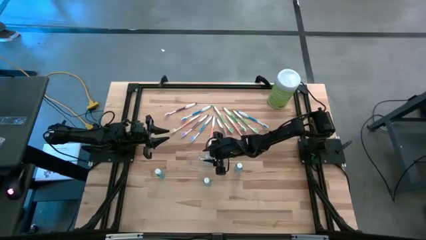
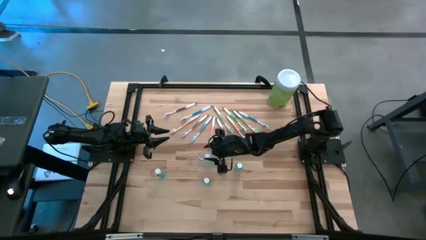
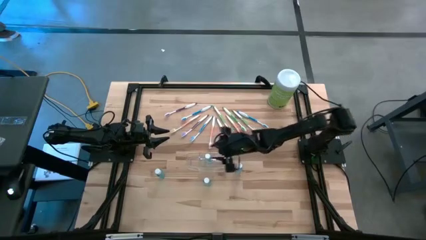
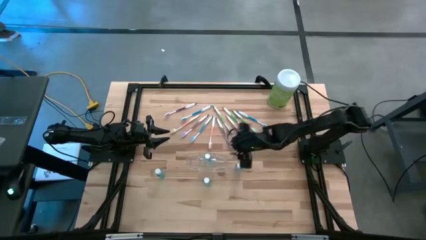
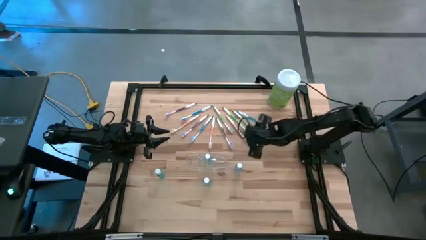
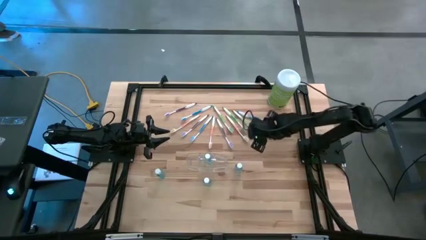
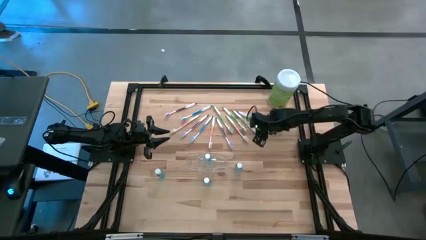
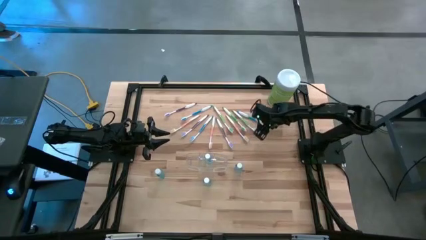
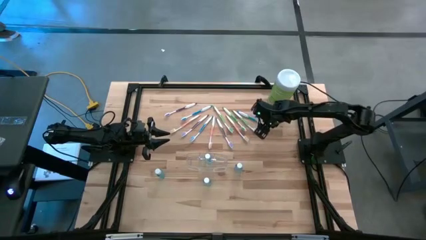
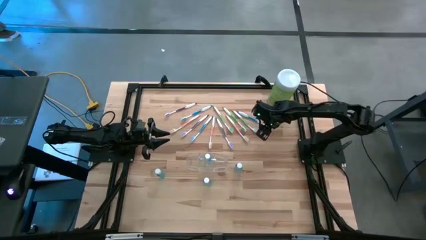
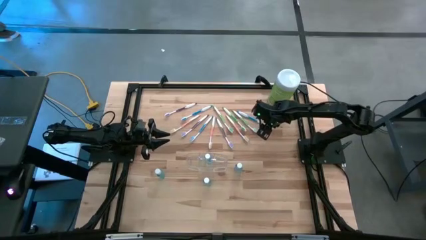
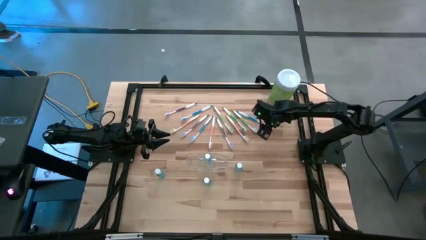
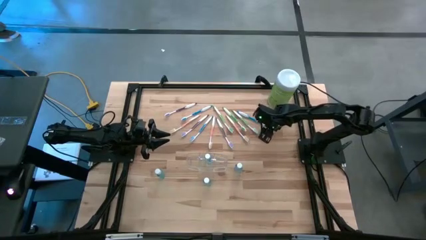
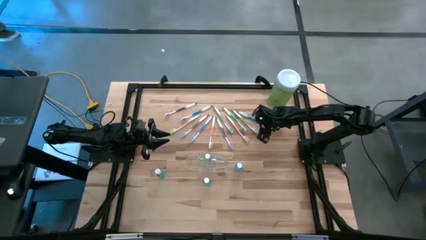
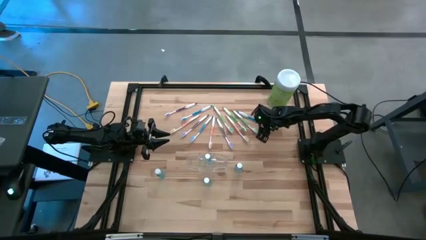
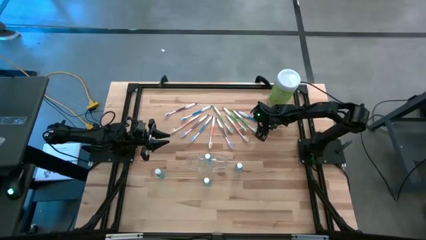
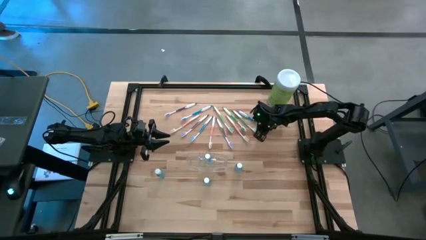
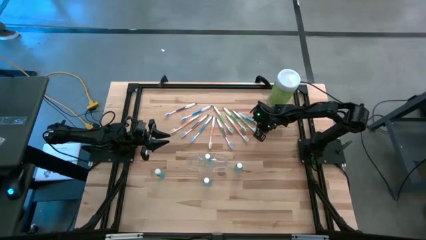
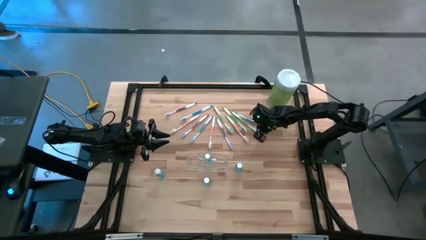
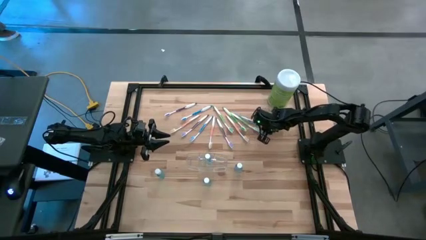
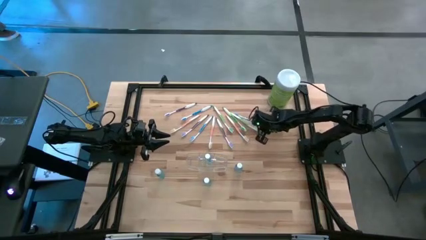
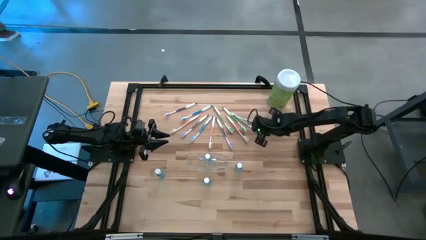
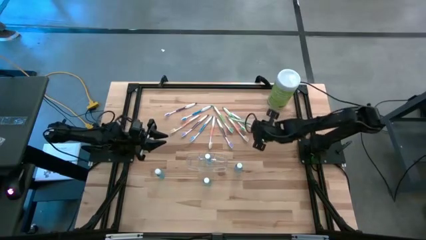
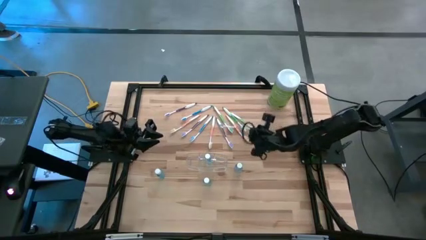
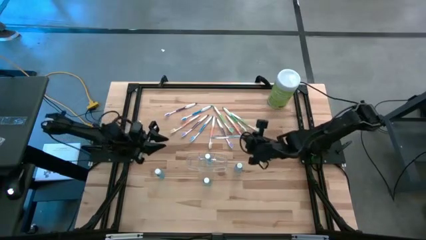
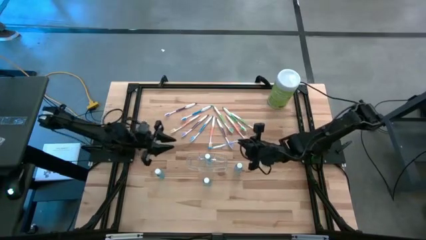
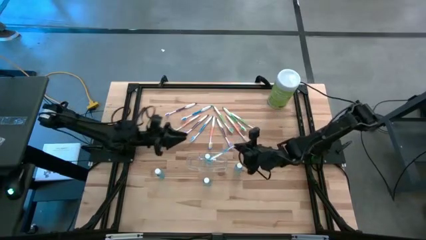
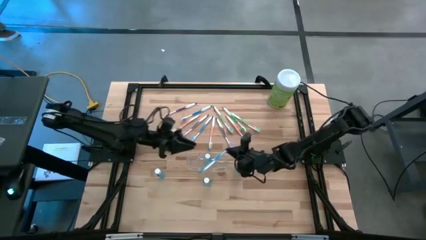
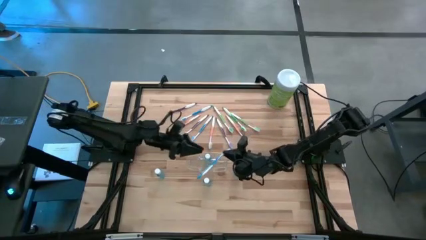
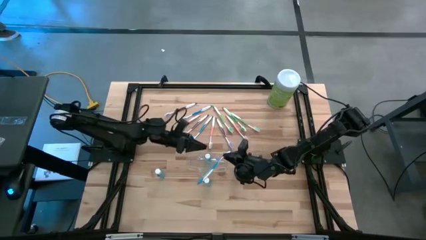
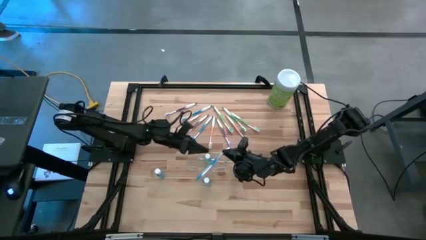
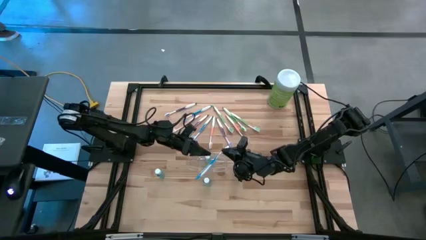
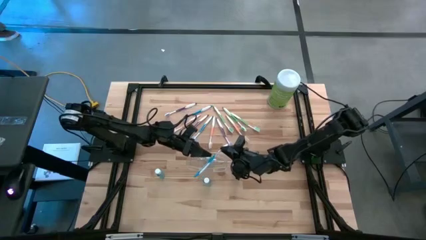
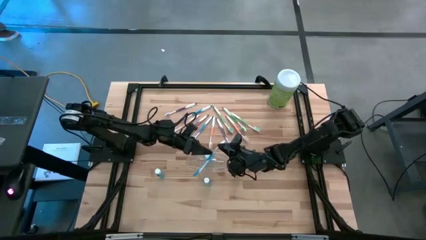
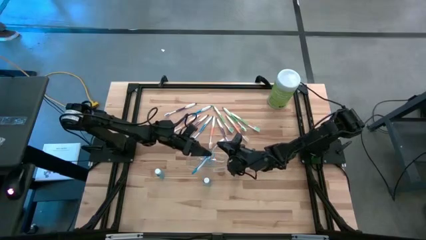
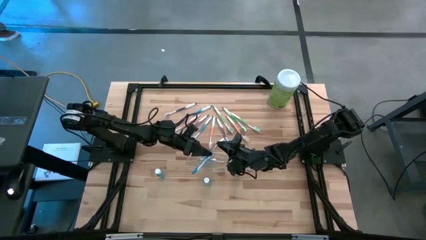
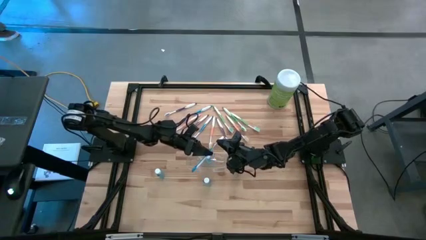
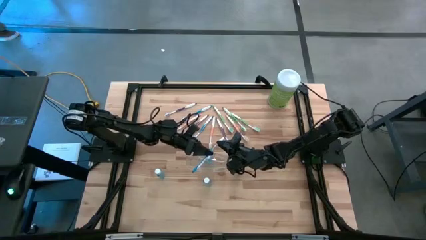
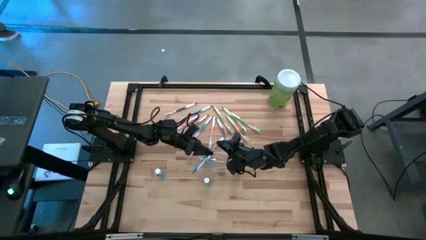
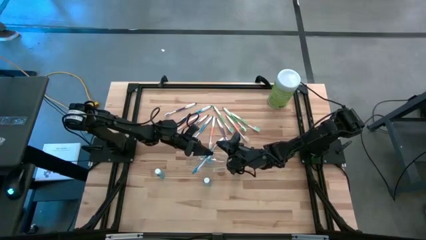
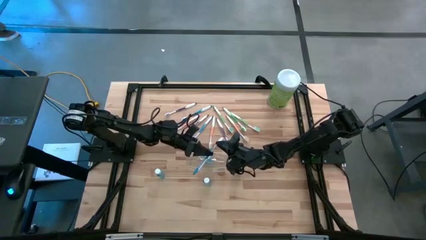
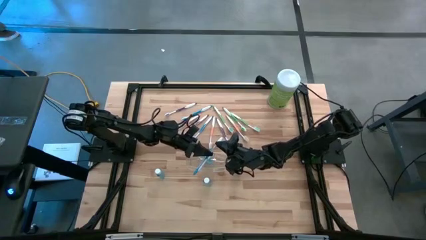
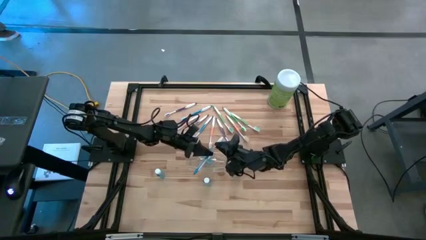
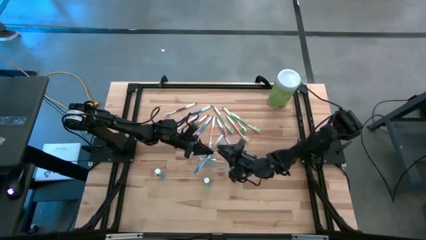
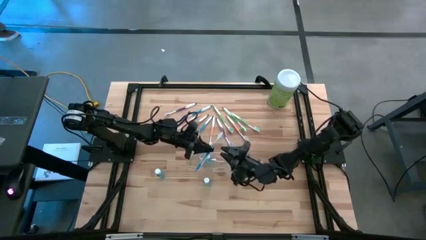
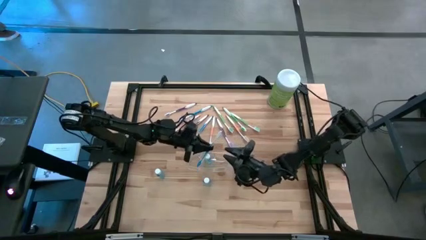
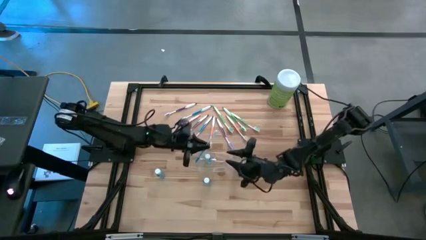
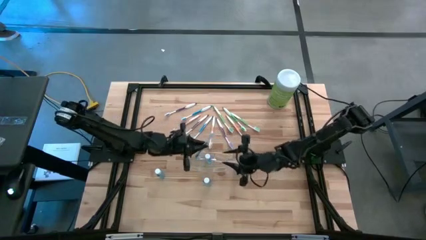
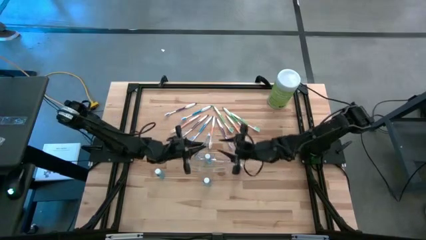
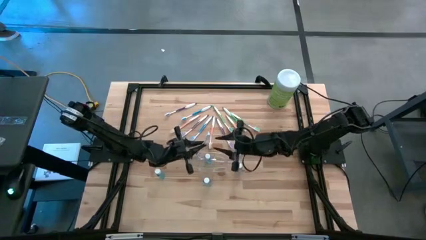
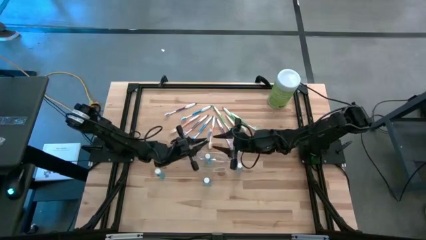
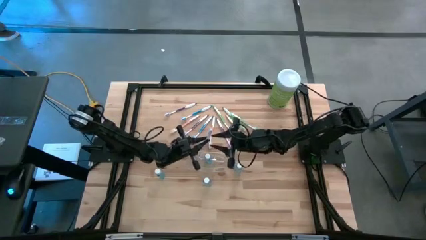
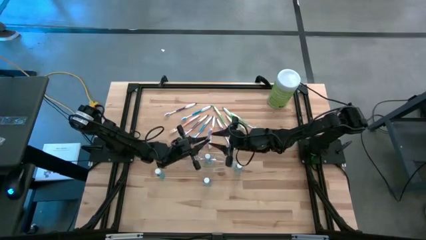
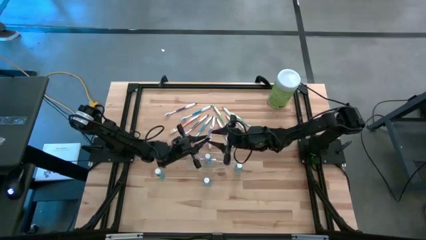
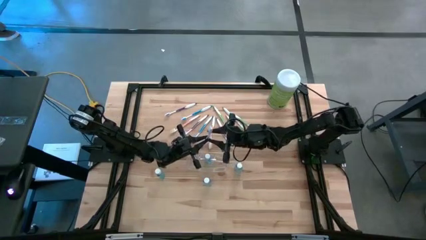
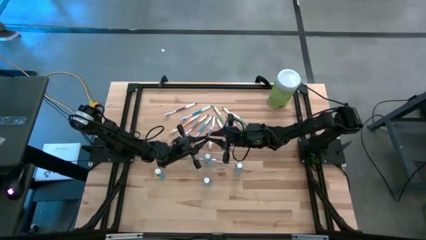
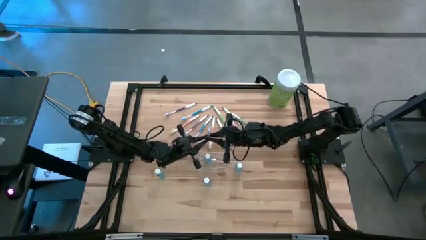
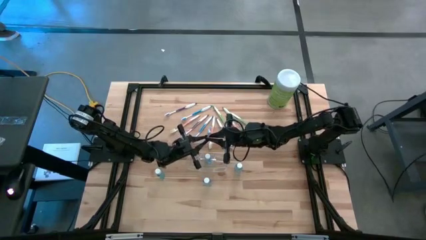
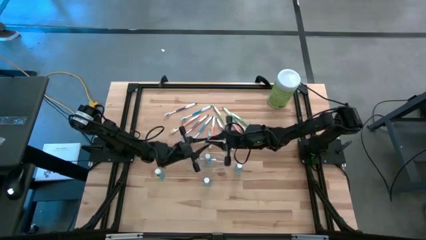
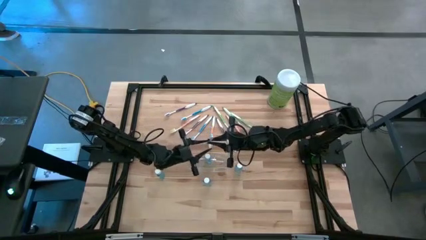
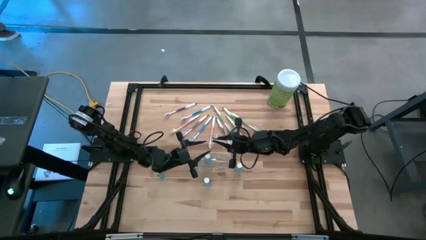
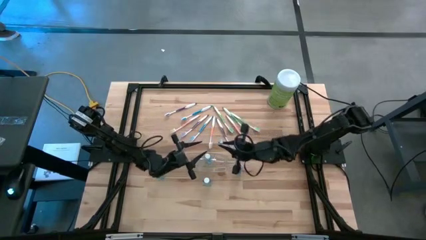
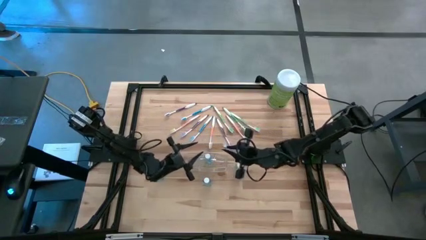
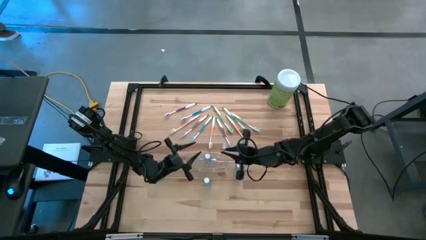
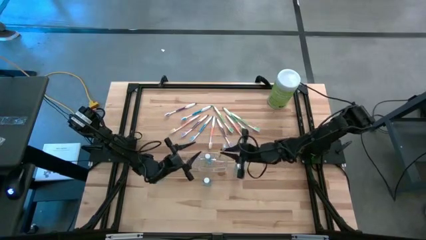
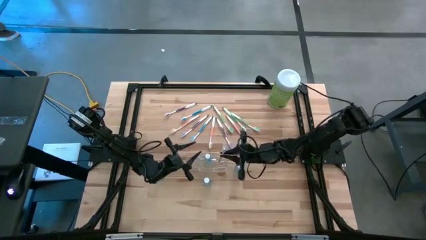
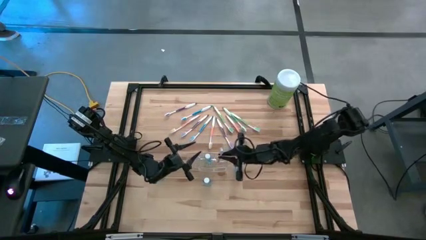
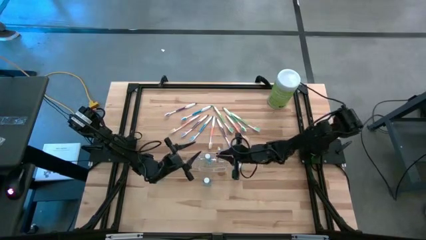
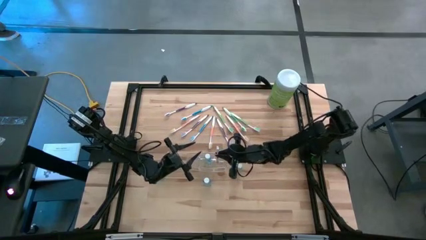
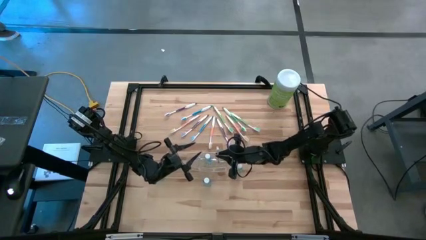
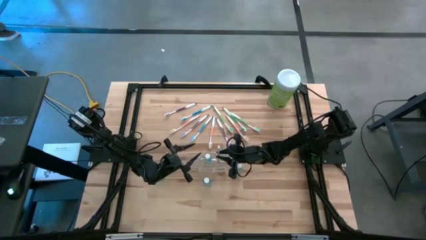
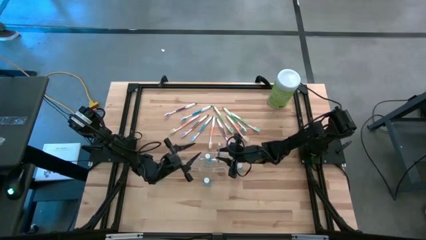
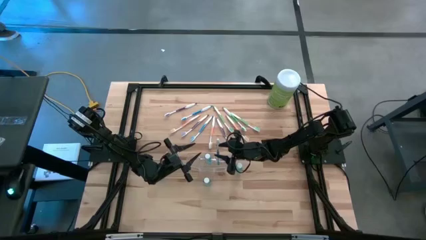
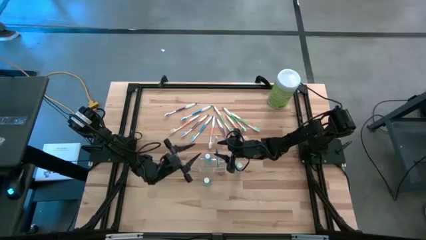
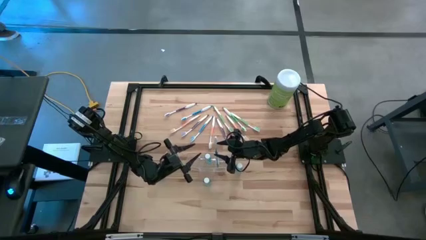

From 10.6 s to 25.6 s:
Task: Pick & Place toothbrushing station
Put the blue toothbrush into the transparent organizer
